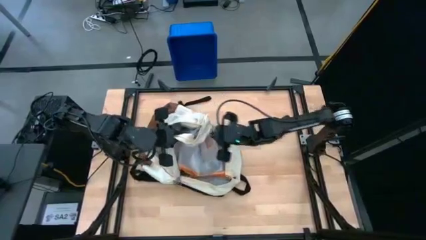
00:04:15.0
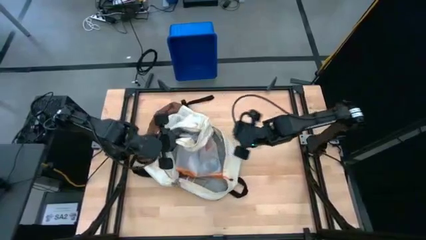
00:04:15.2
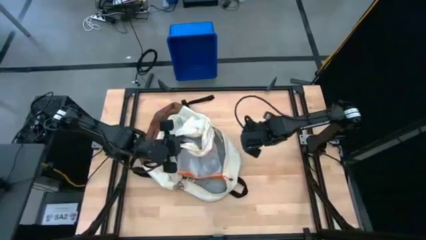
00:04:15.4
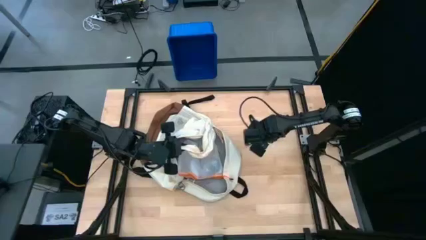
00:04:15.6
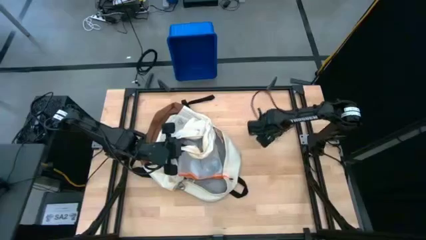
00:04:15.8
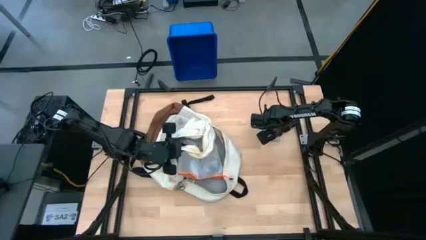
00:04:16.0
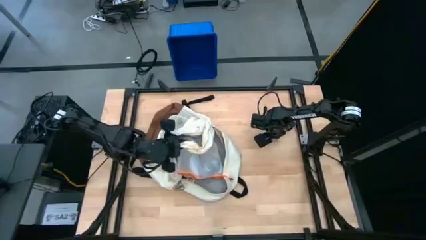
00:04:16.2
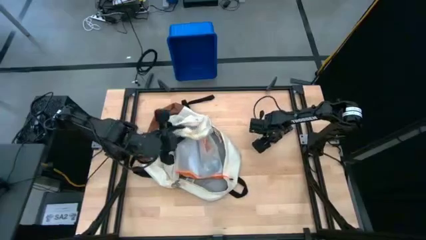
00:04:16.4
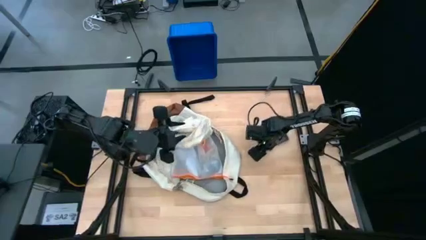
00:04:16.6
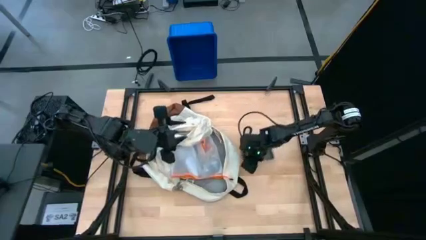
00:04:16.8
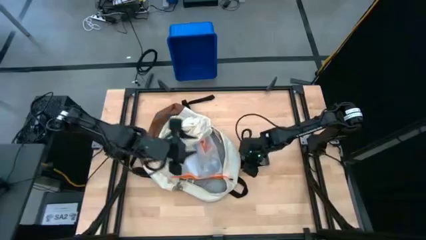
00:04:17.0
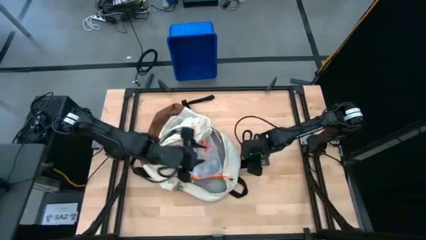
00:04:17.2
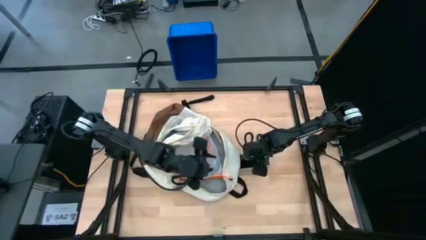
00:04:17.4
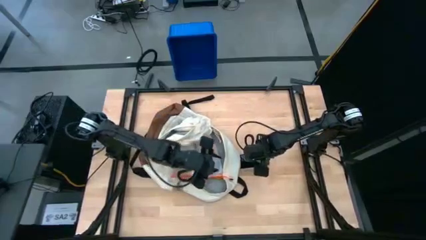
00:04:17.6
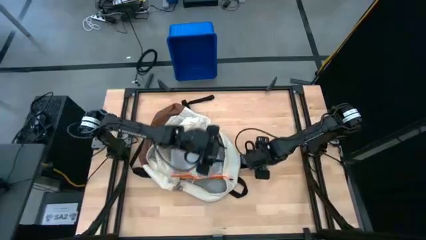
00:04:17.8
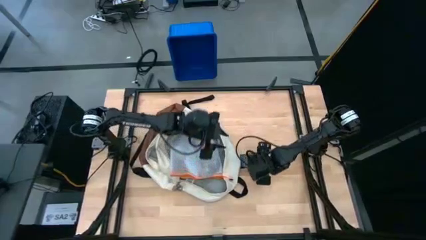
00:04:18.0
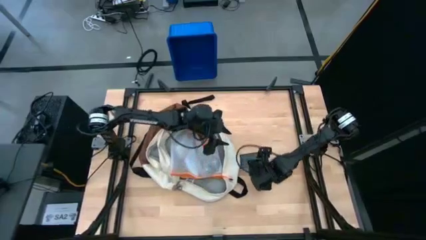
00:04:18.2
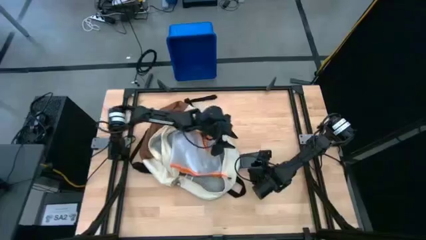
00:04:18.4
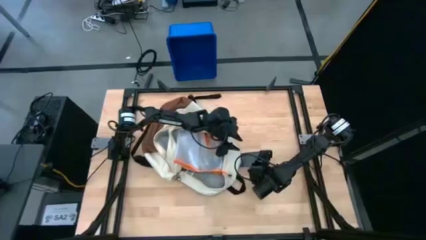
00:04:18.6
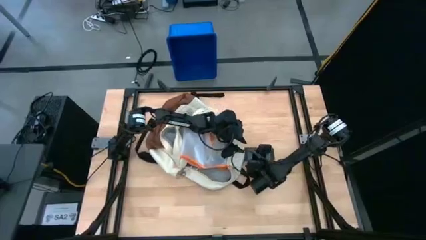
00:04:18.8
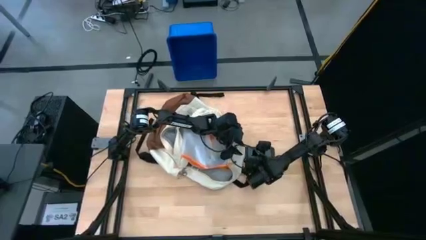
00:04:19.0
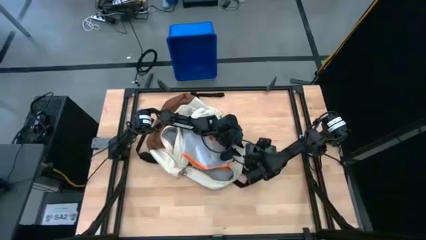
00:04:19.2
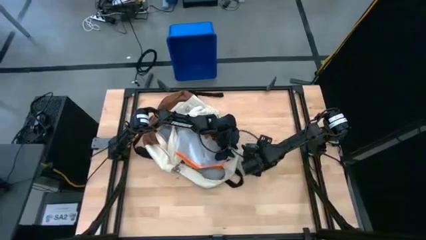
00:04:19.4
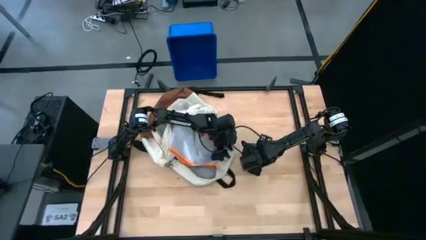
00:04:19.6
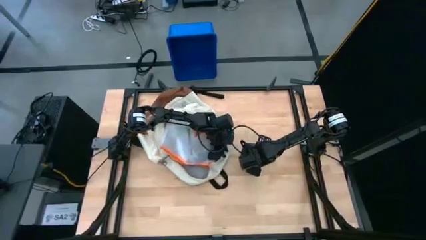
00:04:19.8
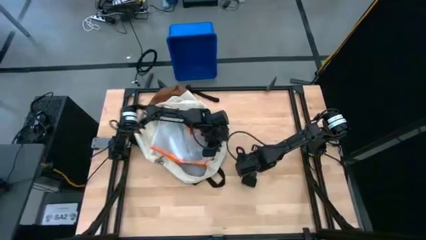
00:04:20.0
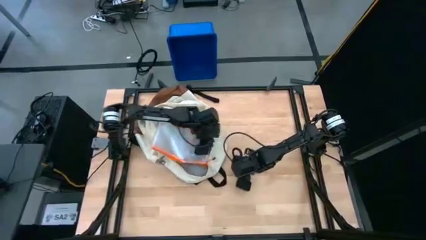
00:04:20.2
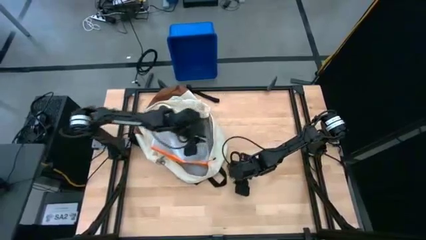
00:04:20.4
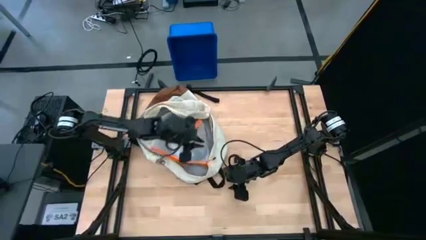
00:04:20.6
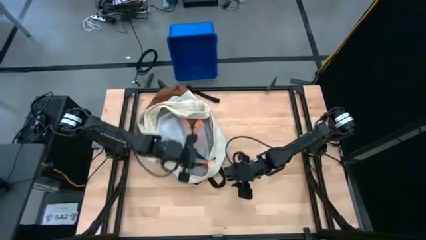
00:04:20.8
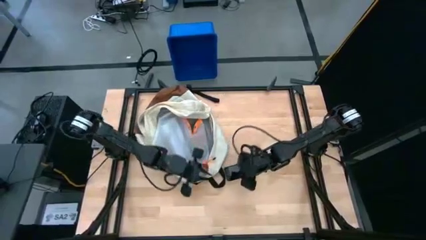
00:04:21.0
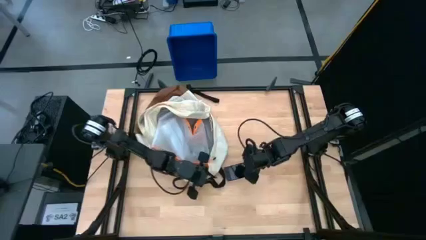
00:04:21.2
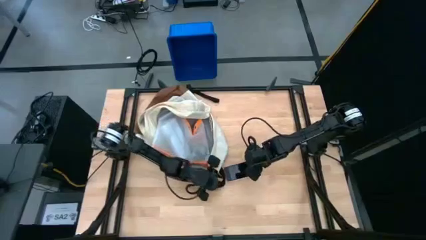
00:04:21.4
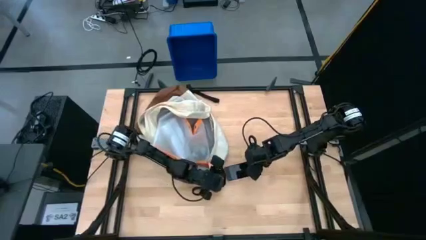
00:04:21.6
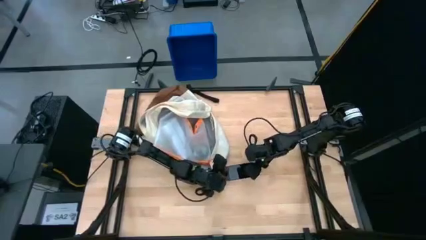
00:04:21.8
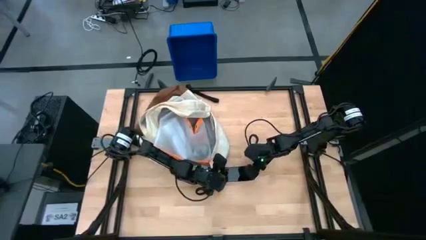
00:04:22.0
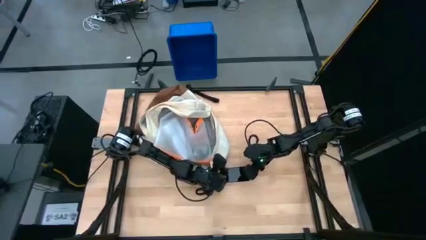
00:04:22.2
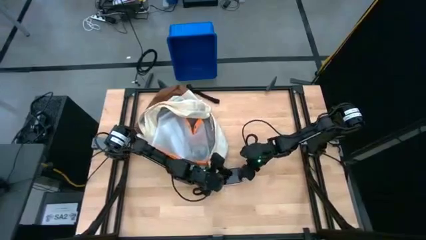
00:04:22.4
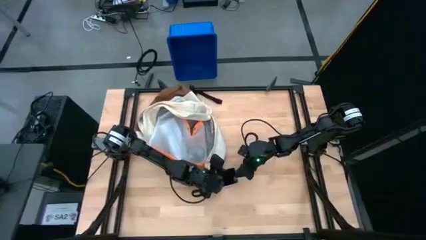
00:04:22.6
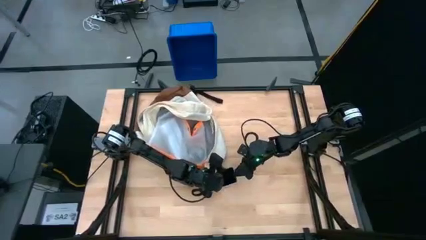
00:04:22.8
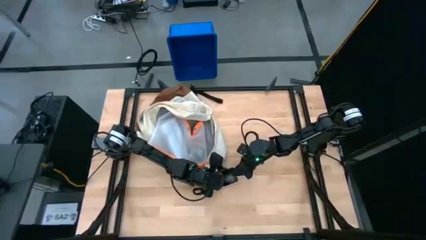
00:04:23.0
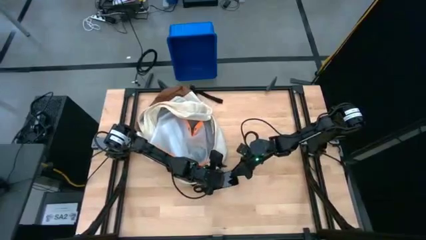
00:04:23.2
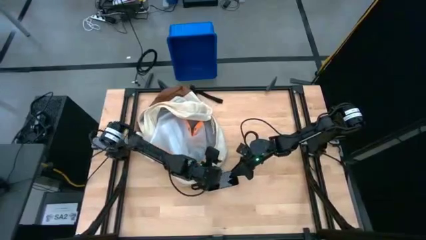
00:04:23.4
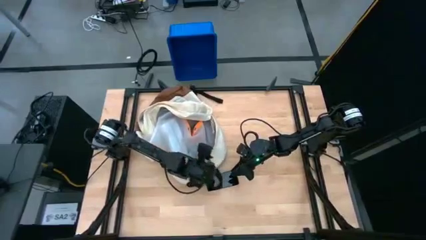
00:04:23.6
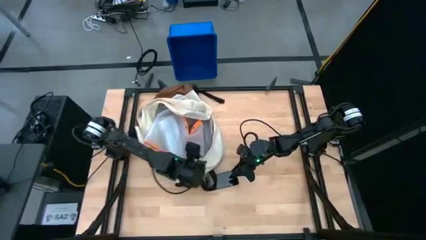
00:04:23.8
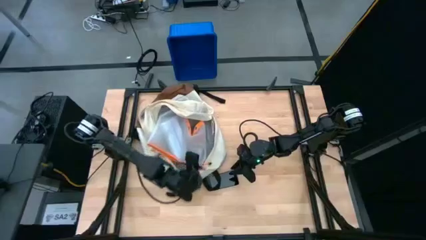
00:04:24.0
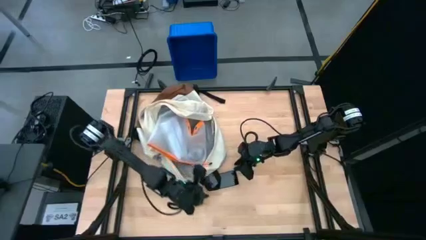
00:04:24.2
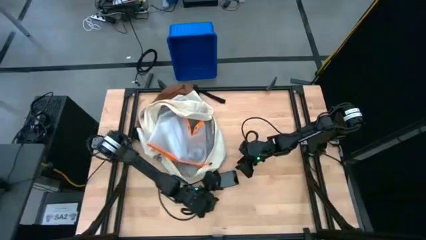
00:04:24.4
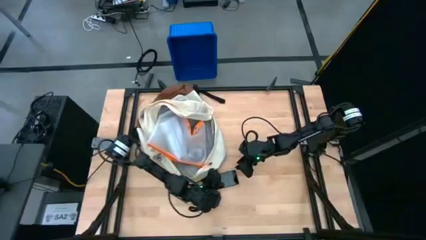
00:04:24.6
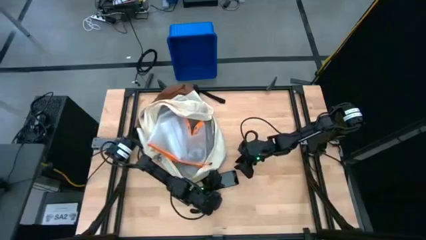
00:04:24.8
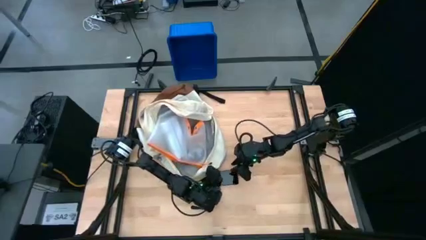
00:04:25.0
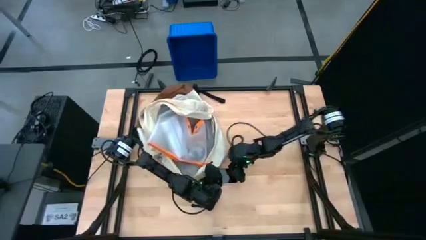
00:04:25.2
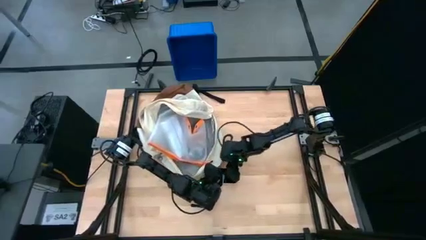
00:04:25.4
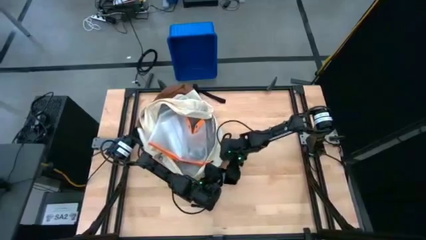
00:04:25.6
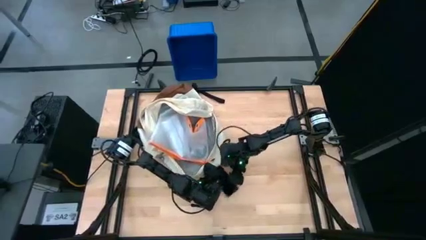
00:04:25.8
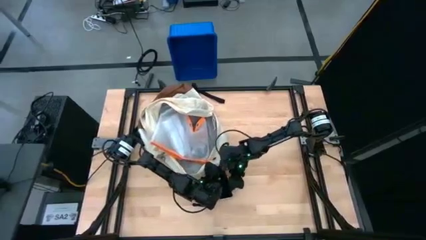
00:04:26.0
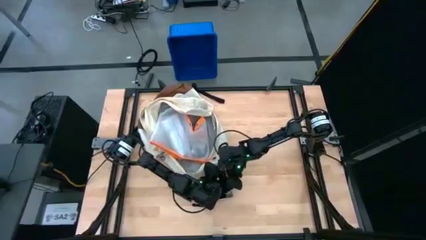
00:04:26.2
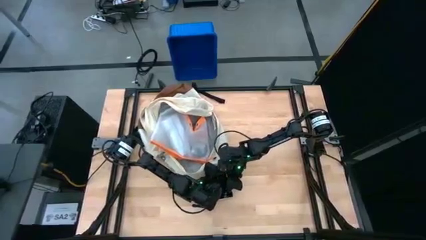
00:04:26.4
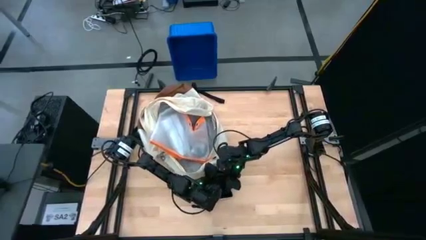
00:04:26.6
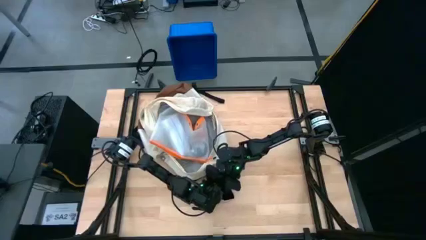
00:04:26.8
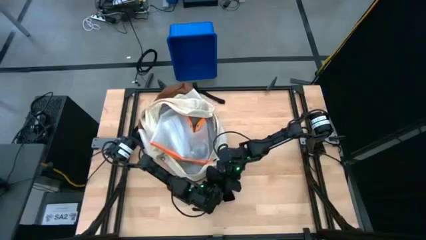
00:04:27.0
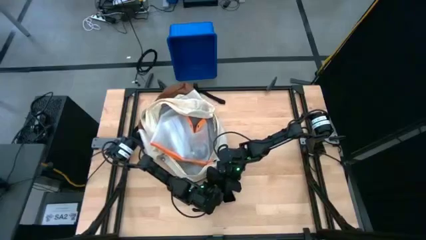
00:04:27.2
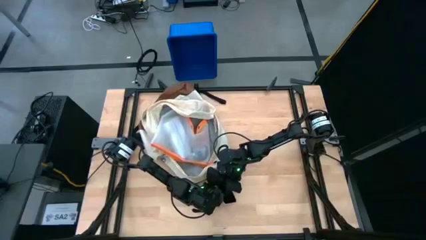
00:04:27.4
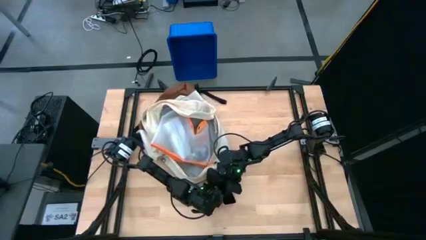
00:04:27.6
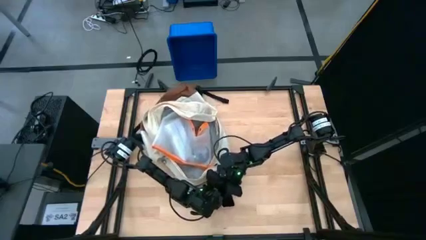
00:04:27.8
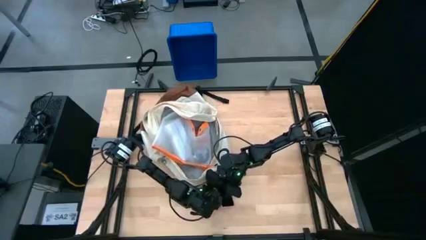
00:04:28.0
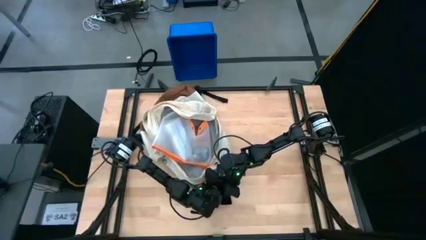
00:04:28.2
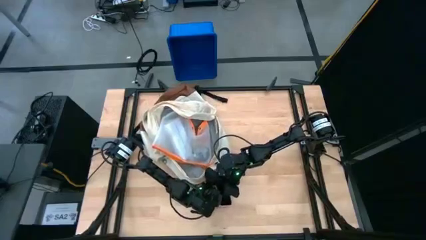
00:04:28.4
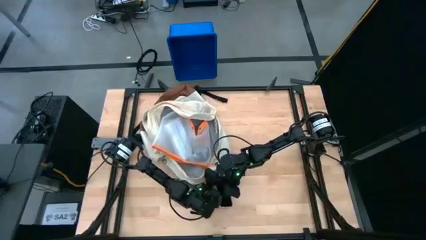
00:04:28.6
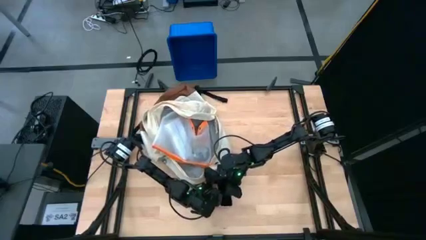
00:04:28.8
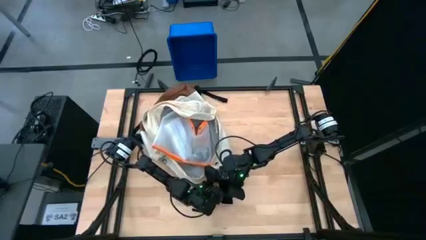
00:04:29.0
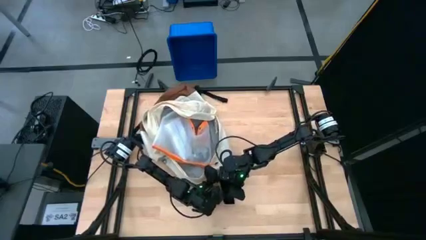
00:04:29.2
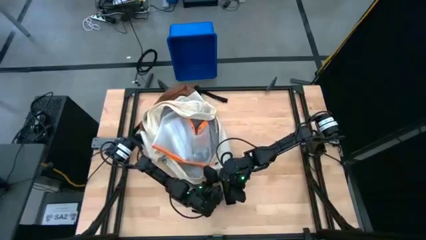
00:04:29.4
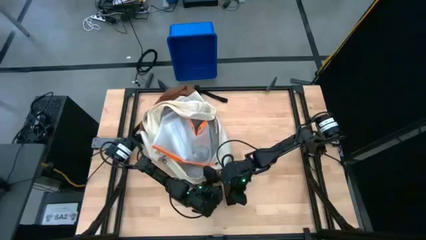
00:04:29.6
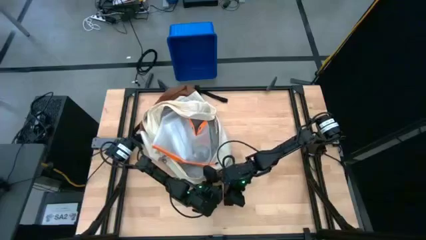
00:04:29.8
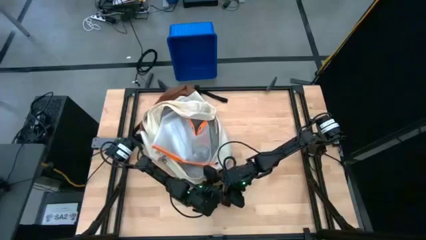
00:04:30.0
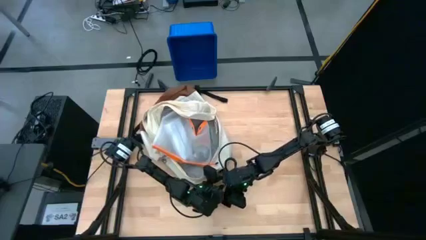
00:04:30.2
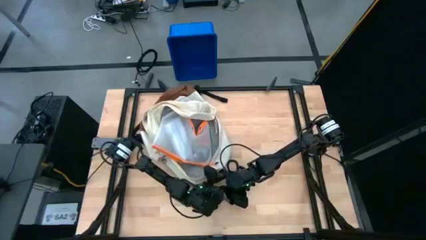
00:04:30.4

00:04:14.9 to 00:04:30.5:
Task: Unpack backpack
Put the pink cellphone into the white backpack

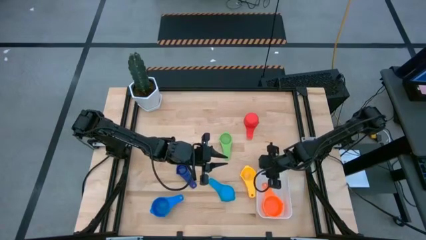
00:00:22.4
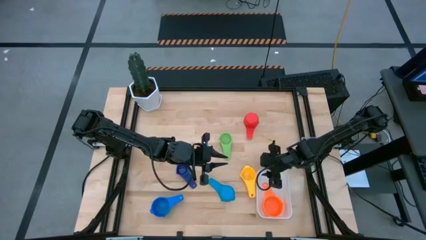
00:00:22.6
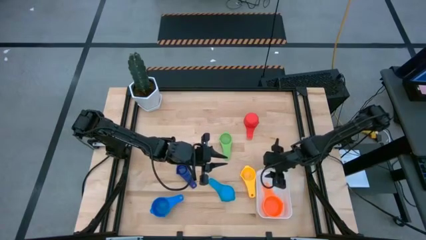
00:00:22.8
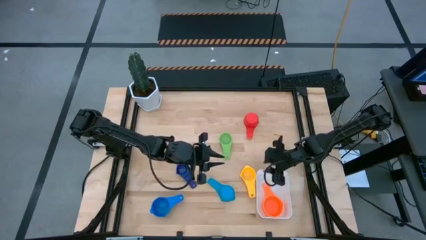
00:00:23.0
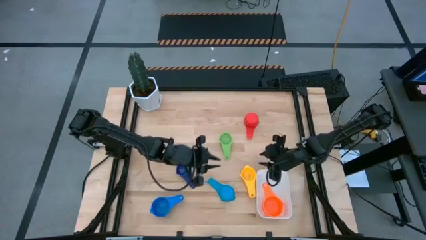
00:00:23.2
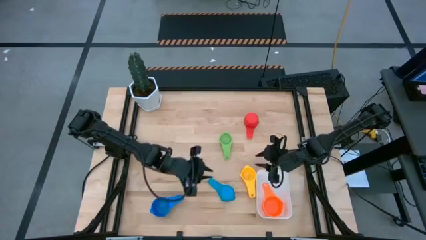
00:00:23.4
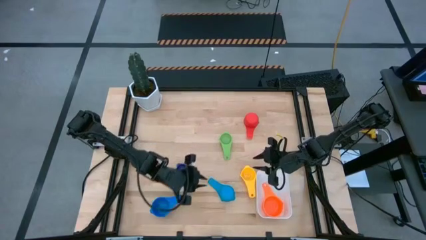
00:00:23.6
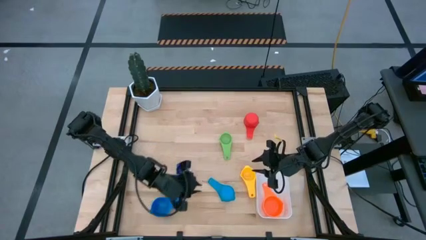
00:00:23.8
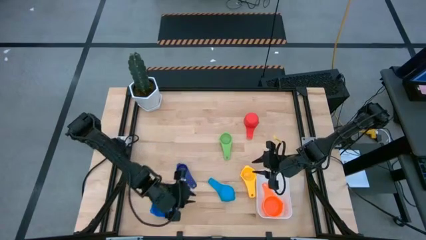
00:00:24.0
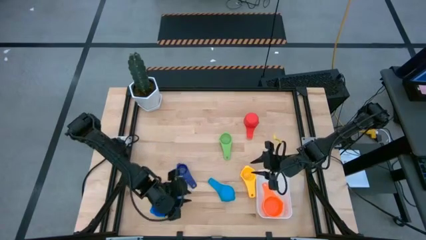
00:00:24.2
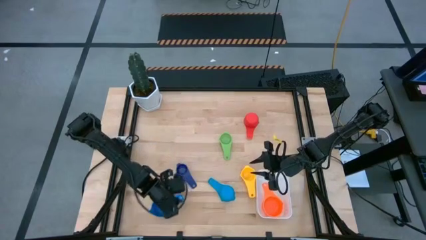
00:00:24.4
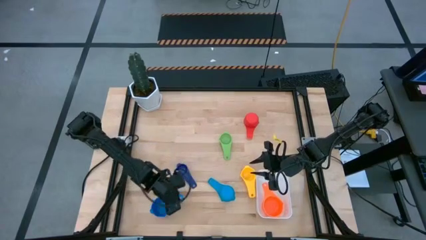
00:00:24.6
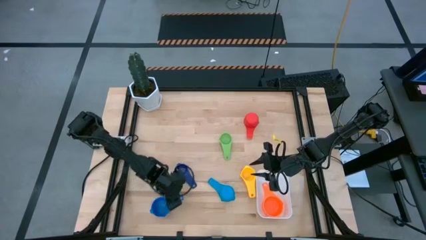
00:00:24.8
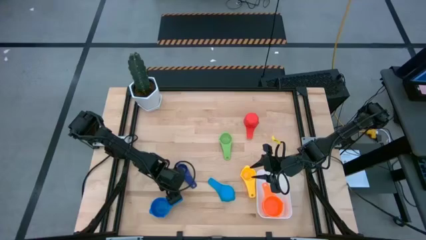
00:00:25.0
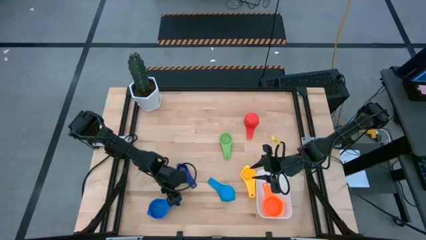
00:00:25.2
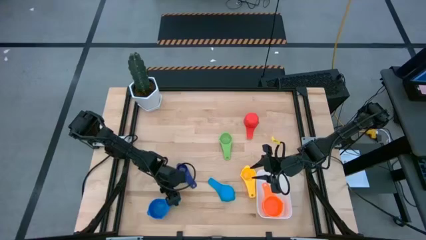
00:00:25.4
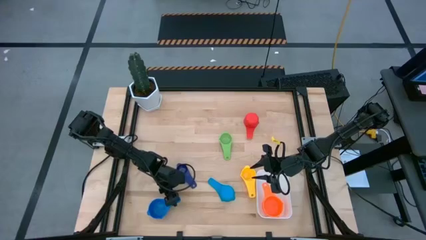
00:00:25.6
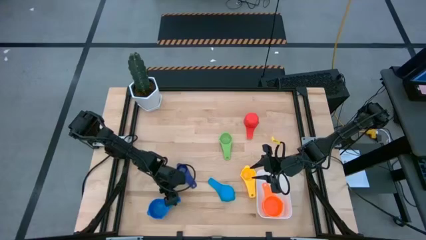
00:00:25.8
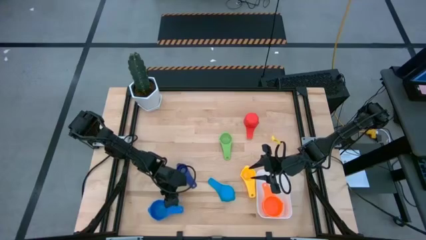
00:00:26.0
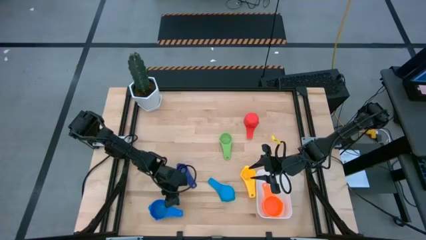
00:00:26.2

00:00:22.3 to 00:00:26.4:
Task: Nest measuring cups in basket
Stack the blue measuring cup on top of the orange measuring cup into the white bin
